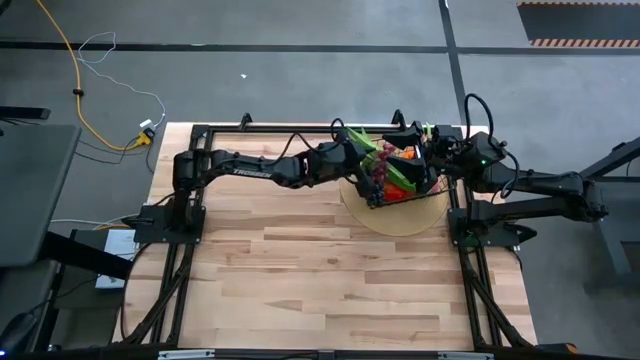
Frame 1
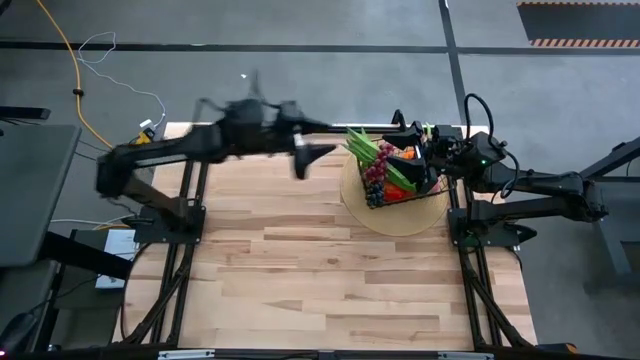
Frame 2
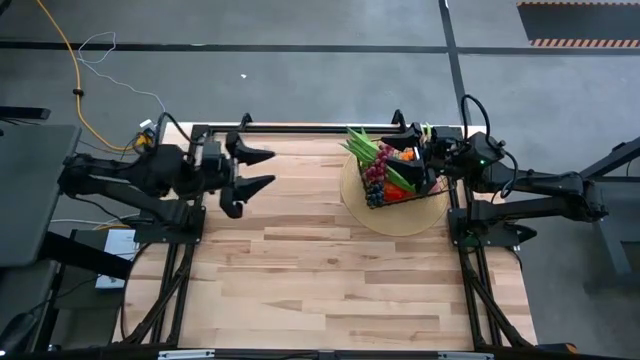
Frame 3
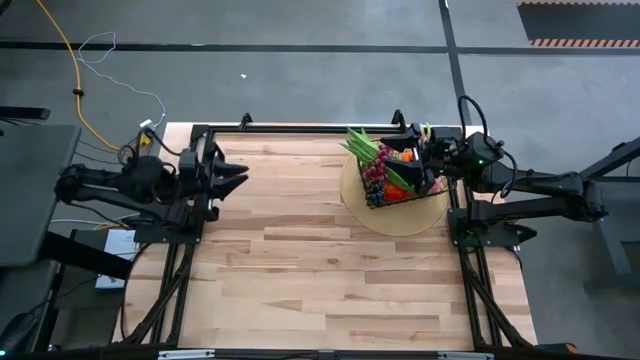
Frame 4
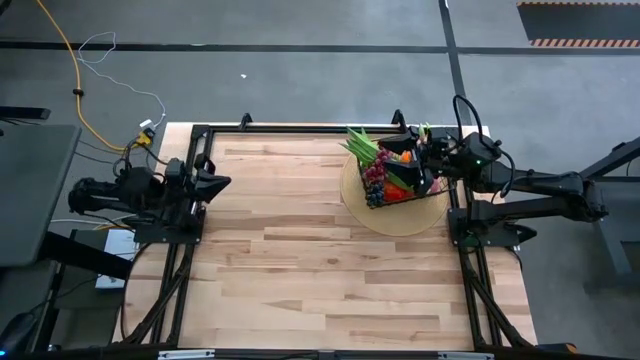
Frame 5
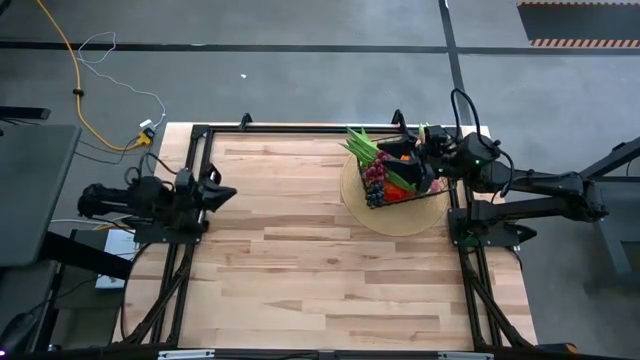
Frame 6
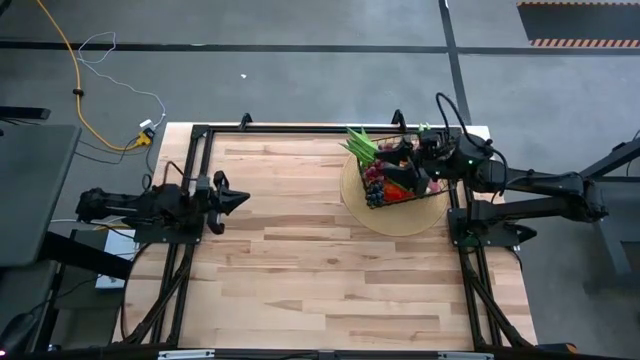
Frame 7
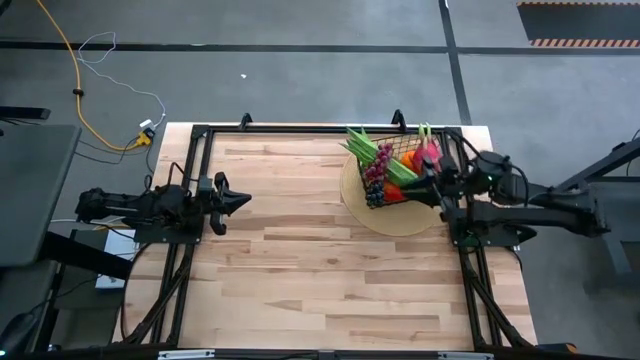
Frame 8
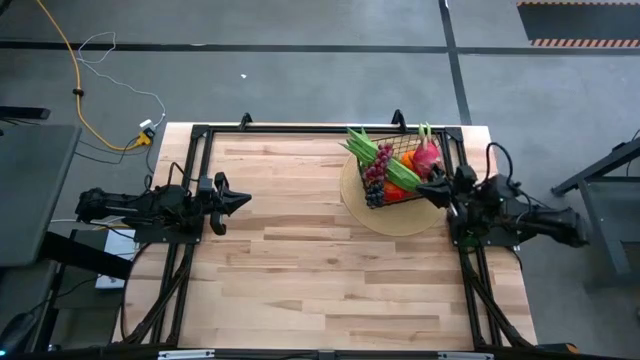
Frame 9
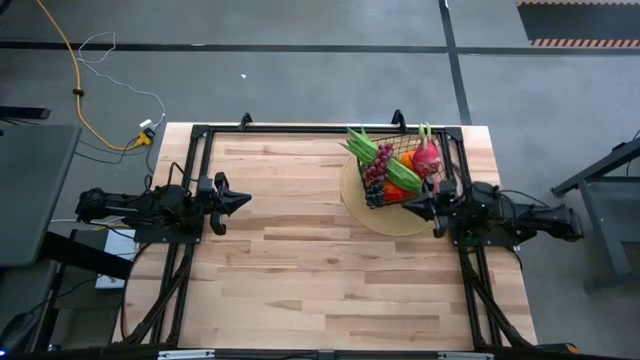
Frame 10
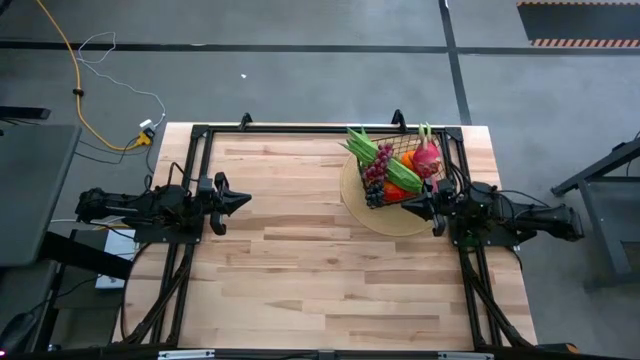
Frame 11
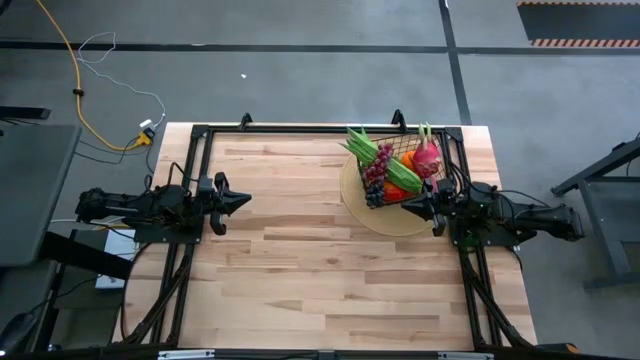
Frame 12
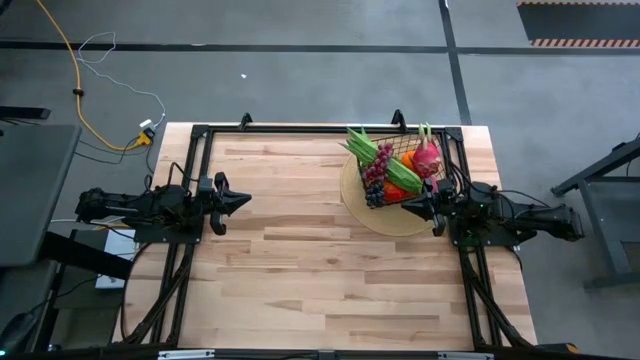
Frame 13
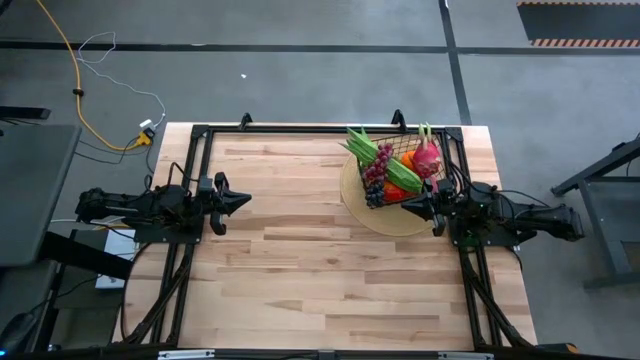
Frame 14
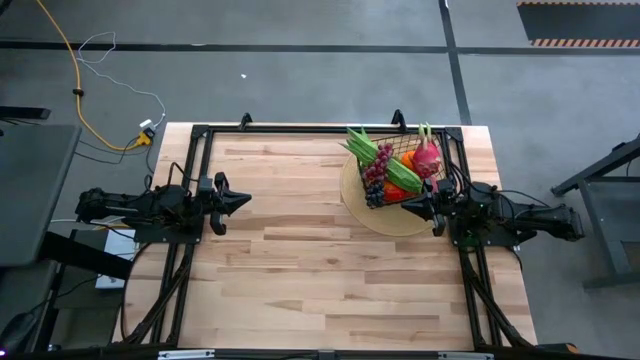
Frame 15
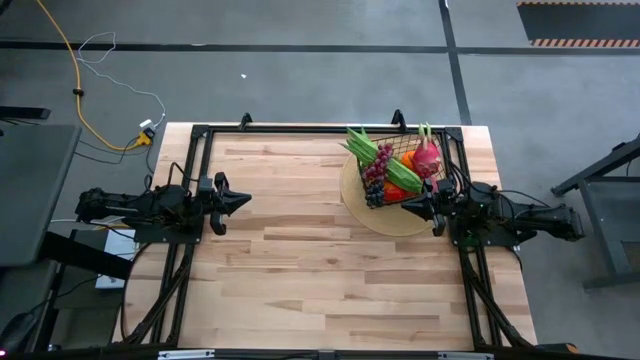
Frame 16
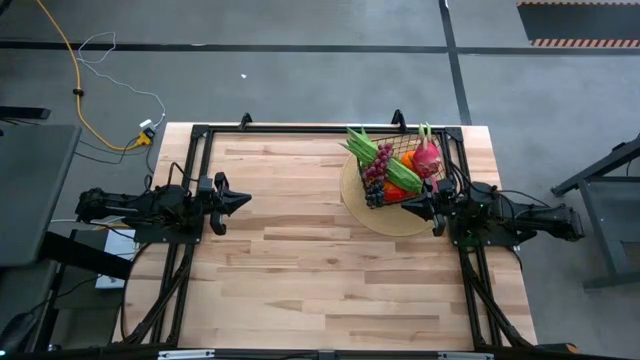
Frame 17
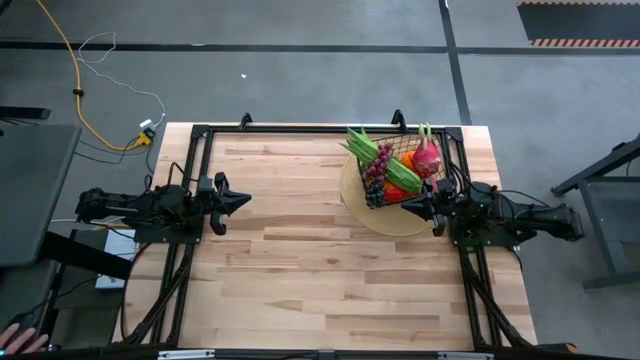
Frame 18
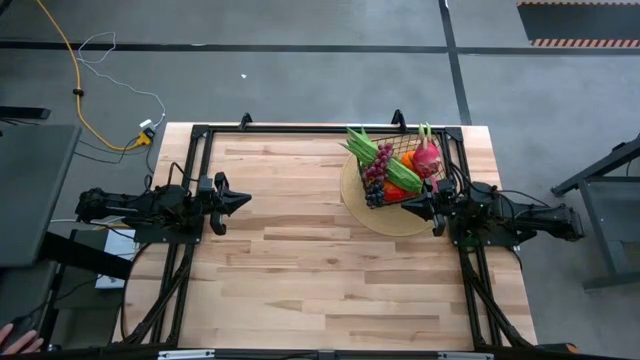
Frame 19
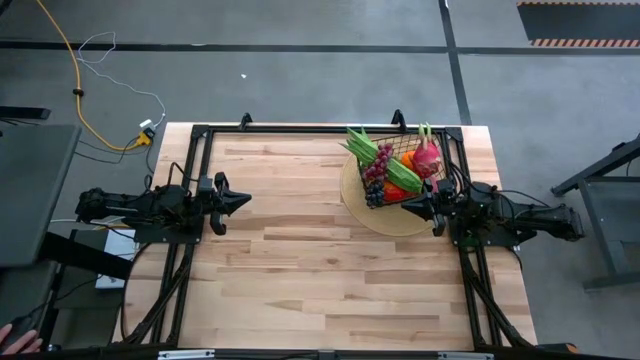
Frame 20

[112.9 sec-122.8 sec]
Task: Build produce basket
Return to Home Position

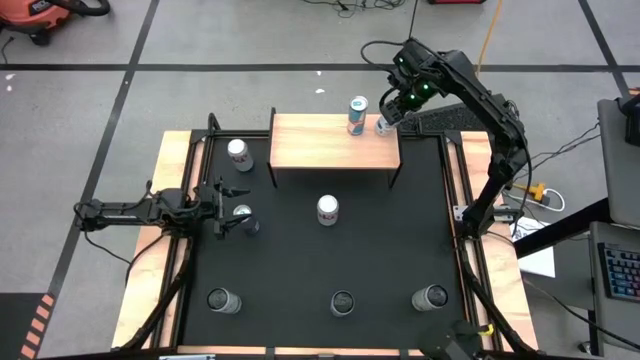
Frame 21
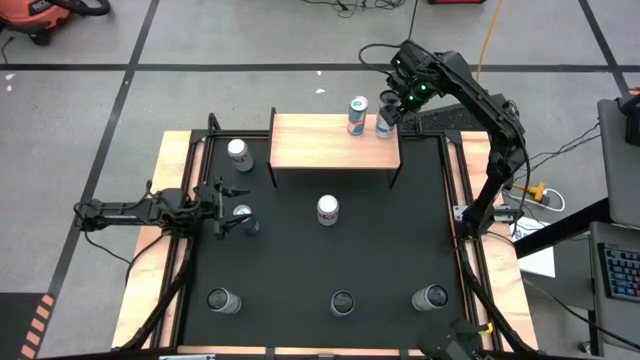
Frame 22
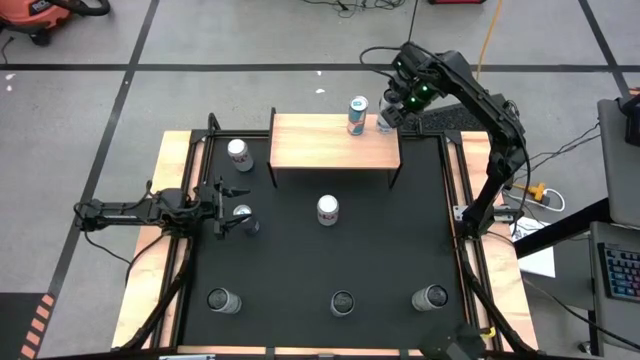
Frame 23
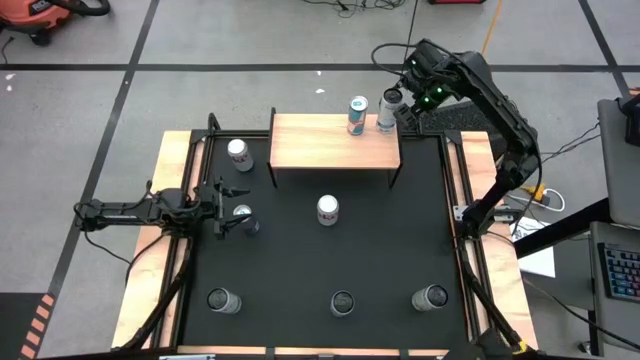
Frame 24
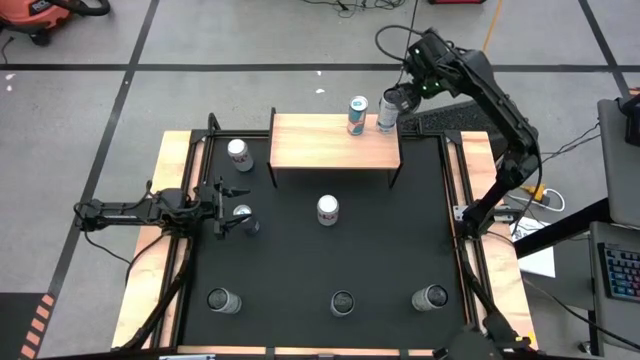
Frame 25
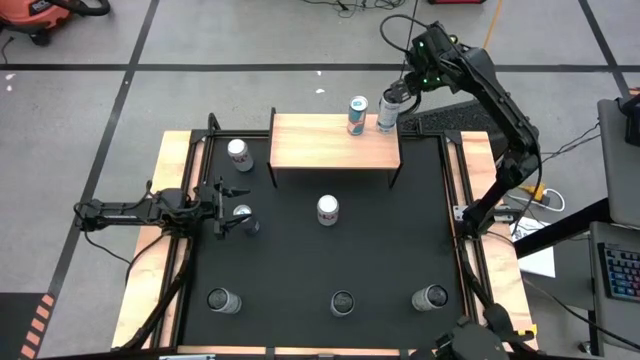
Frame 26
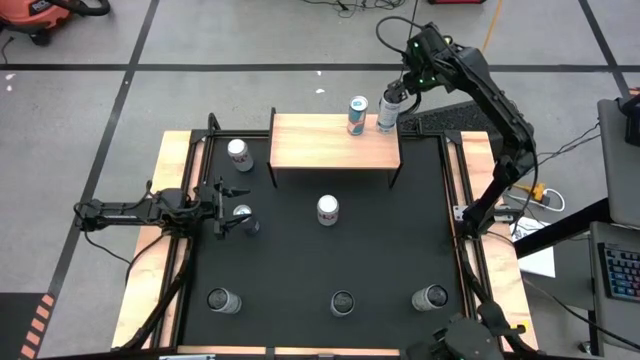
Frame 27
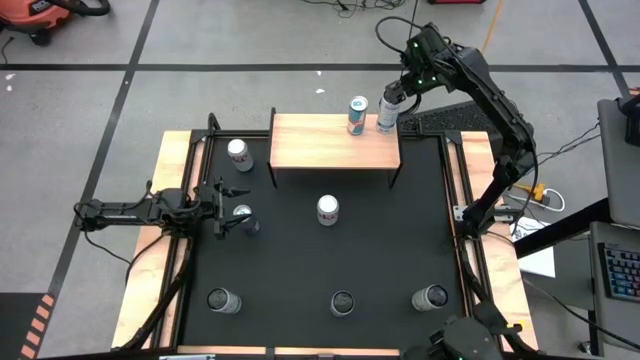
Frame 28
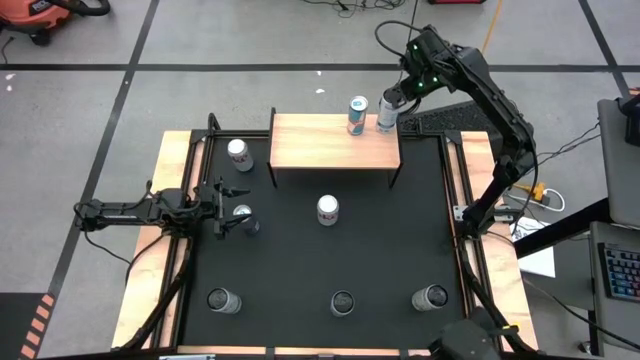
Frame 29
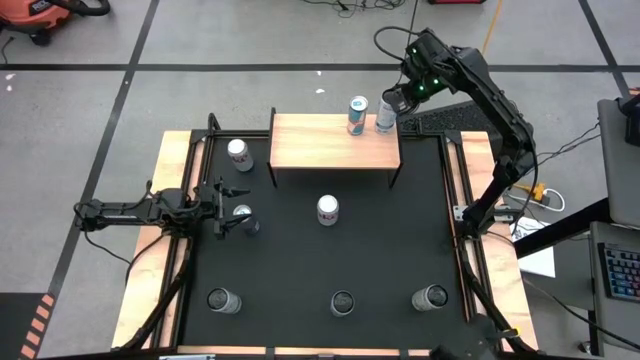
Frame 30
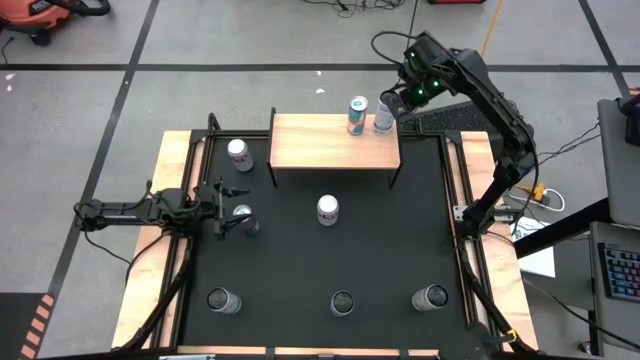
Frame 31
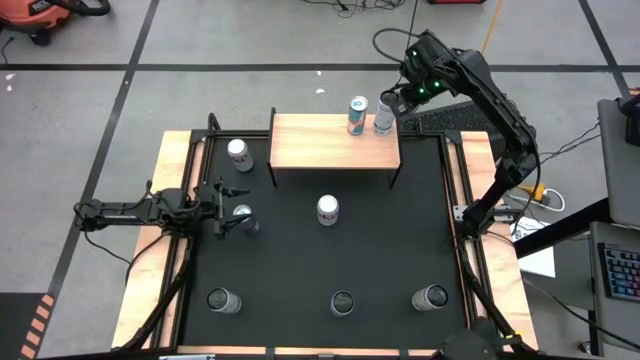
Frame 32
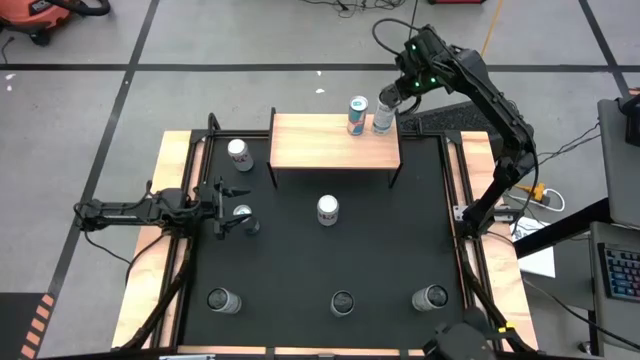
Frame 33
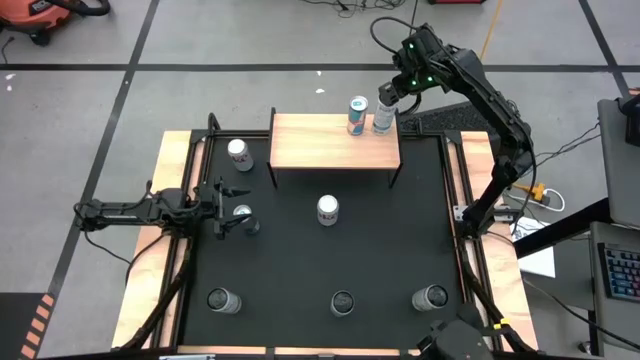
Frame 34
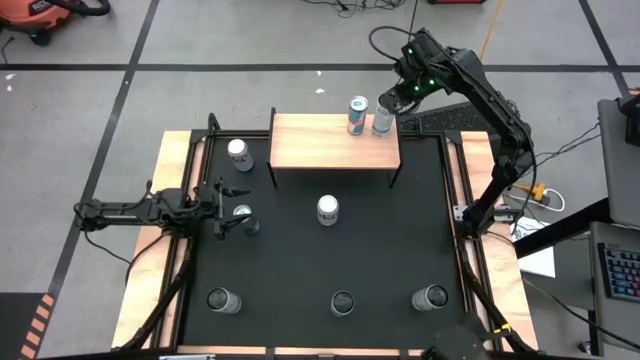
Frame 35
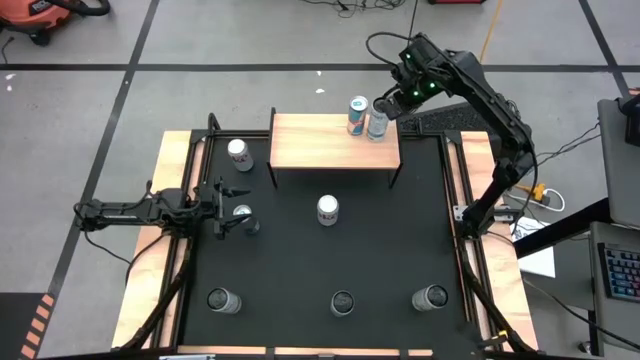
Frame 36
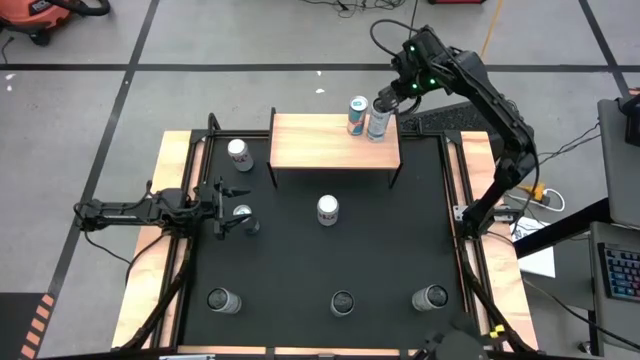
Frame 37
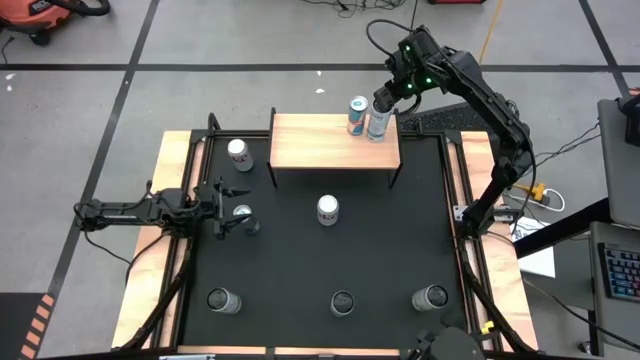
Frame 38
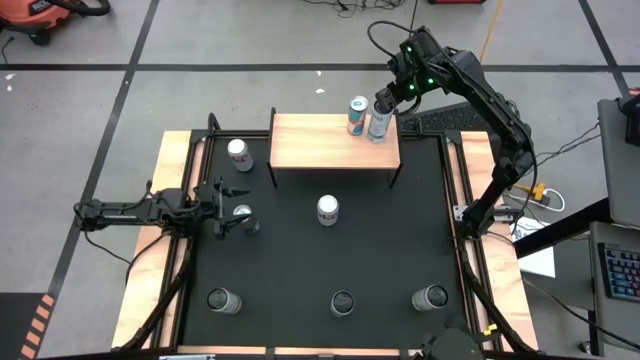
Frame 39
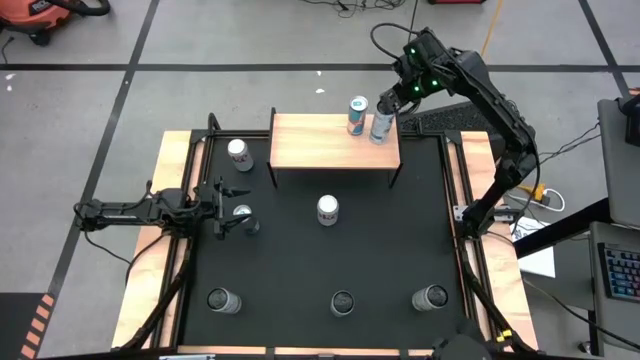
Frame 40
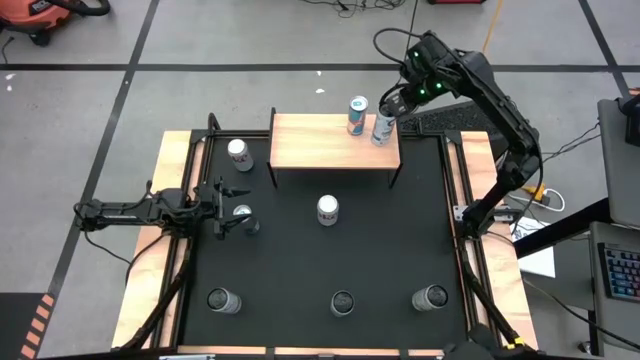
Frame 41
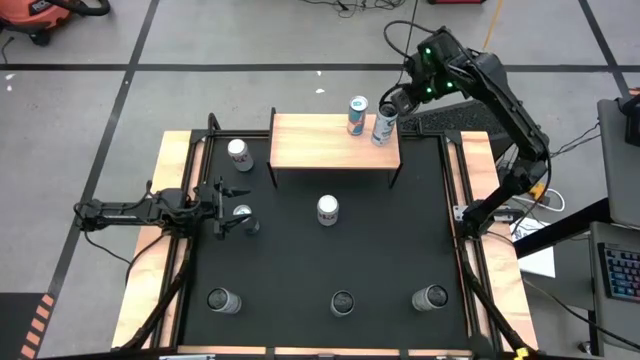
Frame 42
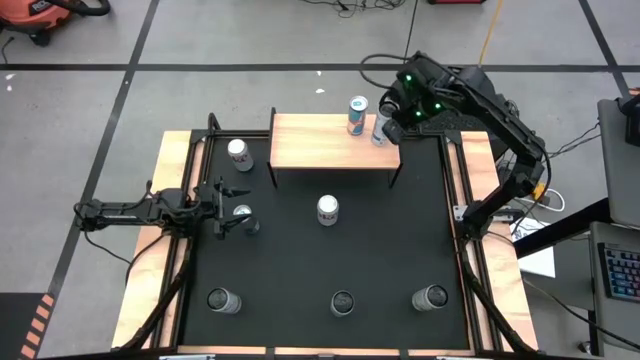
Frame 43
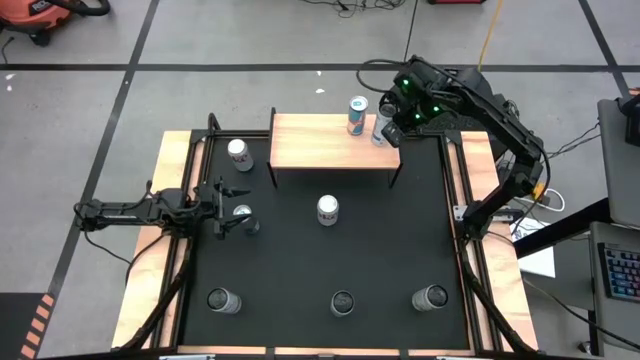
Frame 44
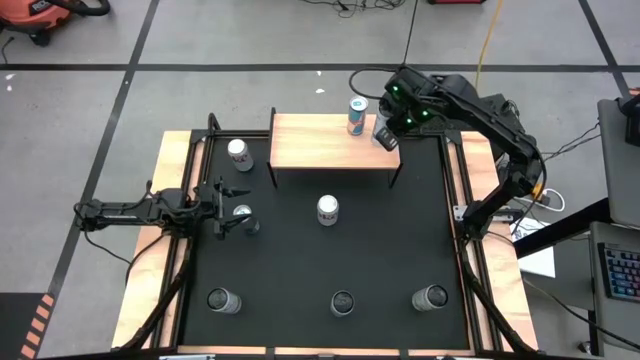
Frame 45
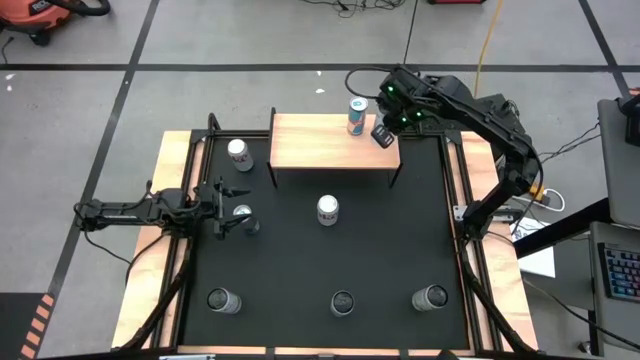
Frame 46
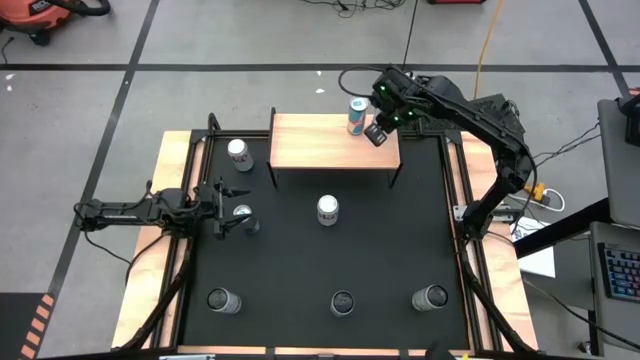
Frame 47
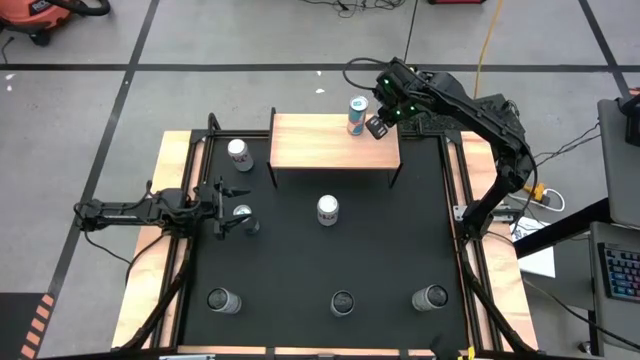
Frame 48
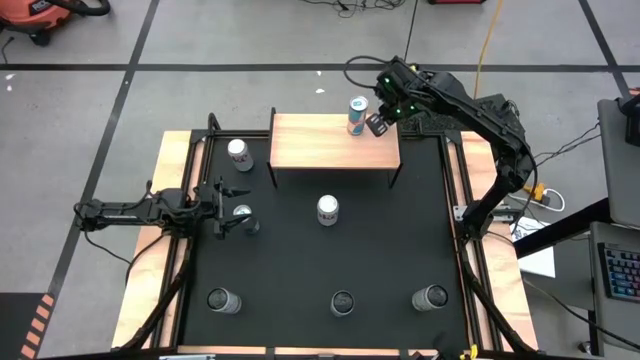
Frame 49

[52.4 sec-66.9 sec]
Task: Place canned beverage on shelf
Put the top white-blue soda can on the shelf
